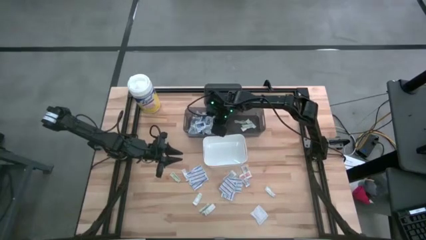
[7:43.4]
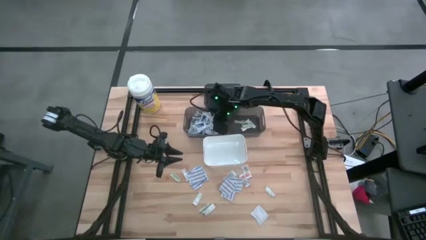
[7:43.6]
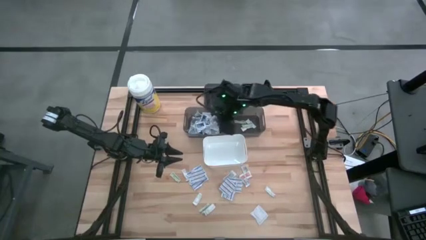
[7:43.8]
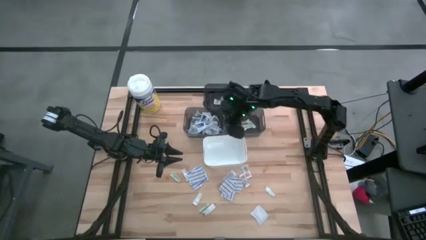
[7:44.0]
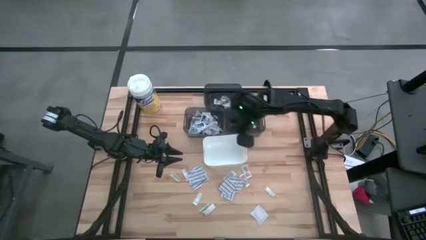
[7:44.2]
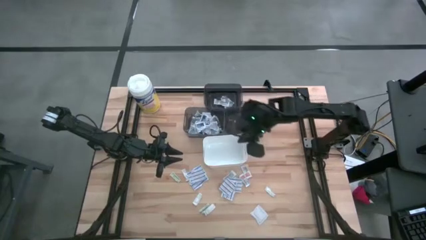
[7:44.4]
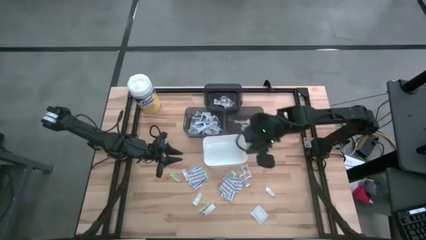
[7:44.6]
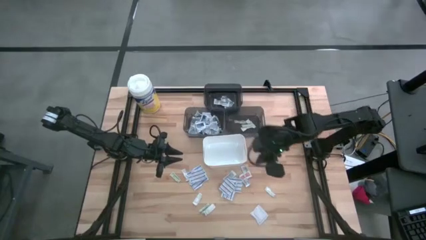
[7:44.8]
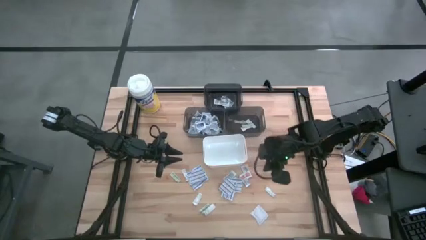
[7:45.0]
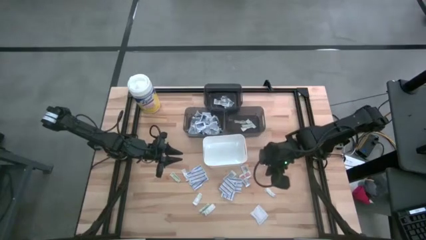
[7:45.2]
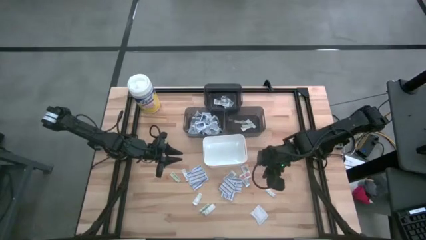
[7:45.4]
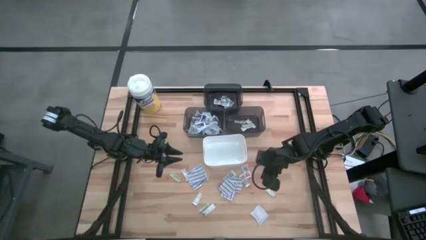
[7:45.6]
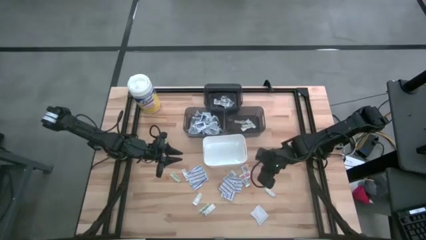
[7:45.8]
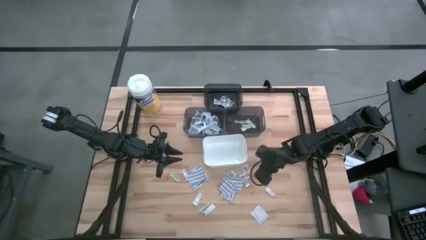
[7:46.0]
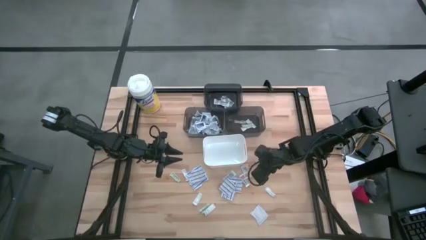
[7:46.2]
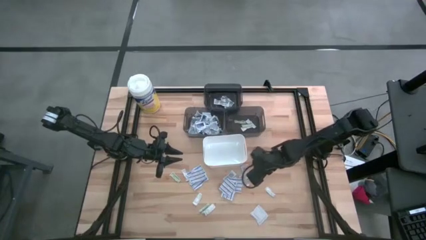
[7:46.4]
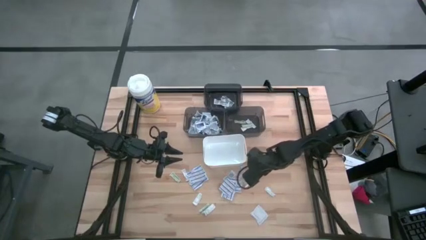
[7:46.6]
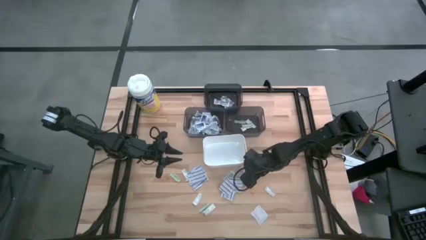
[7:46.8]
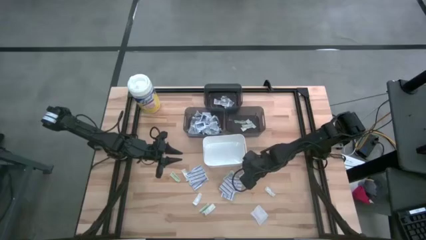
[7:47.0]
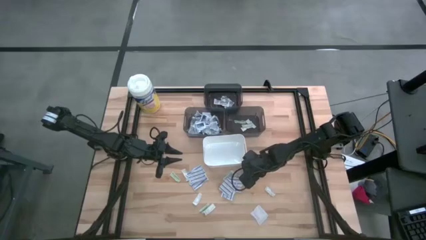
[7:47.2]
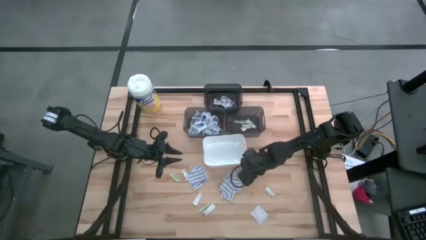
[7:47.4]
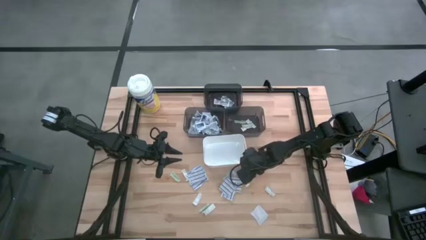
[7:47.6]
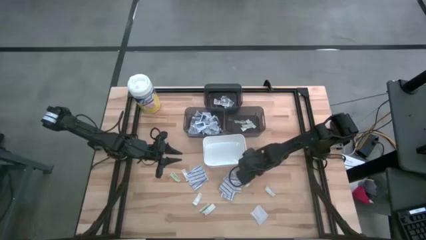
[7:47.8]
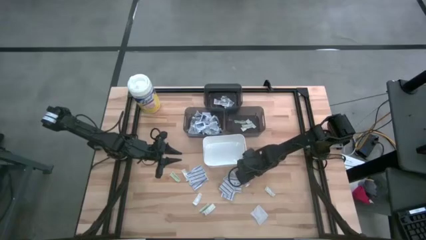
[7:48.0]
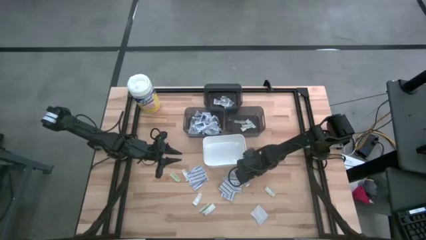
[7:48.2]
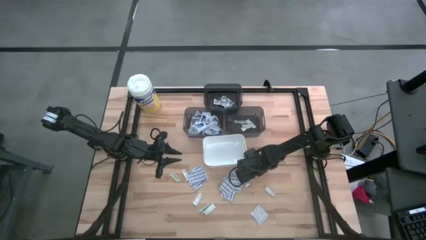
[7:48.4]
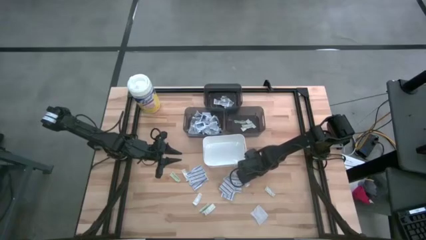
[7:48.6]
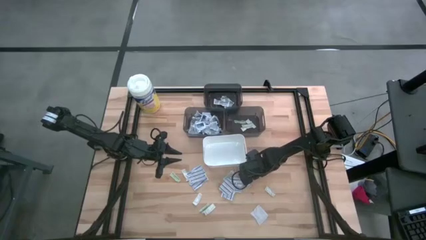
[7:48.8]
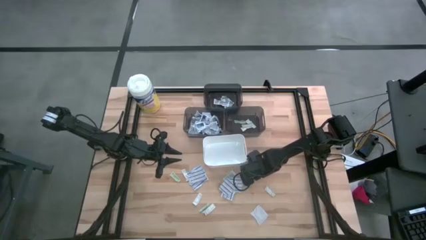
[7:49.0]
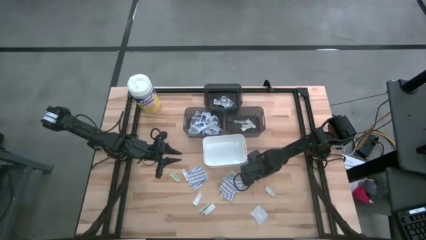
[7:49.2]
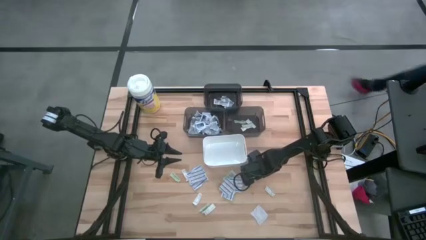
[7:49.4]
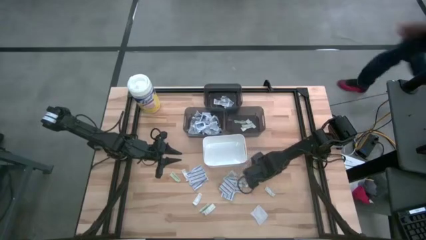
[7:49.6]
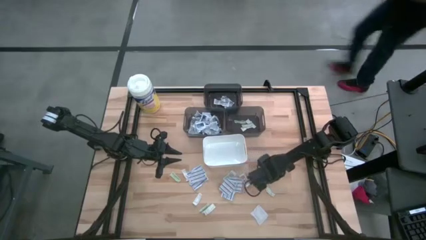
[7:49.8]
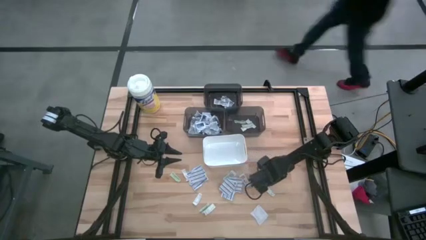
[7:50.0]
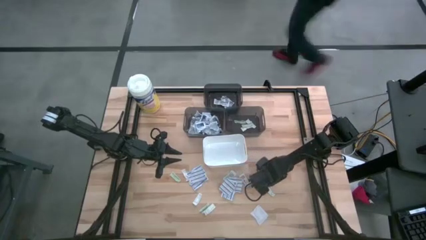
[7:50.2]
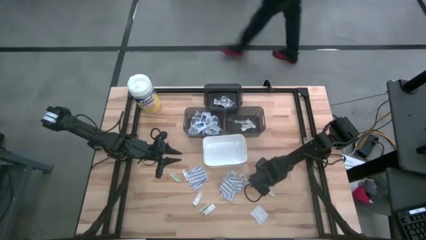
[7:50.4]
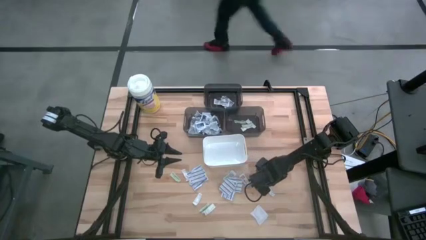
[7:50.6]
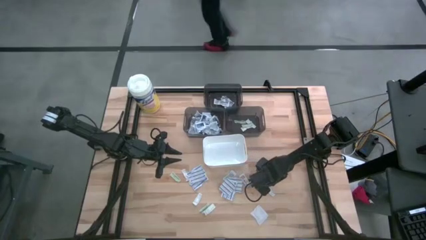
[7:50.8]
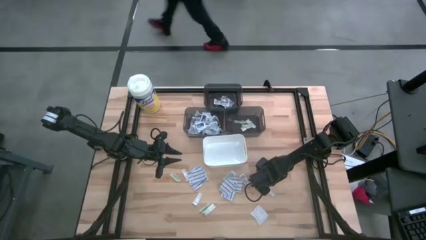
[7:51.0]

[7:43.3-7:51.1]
Task: Pick & Place First Aid Supplies
Put the ointment pack into the top black bin

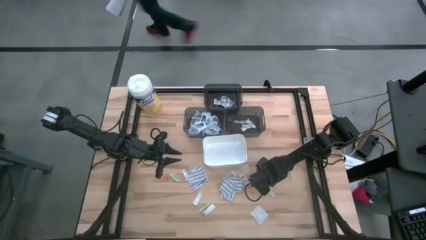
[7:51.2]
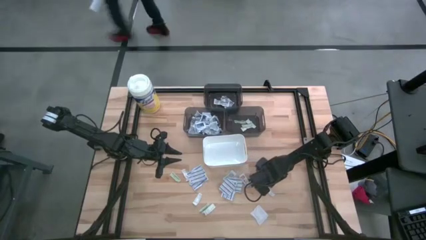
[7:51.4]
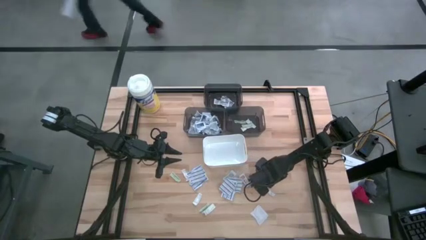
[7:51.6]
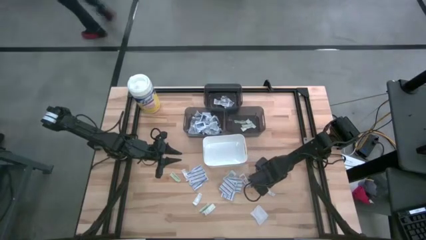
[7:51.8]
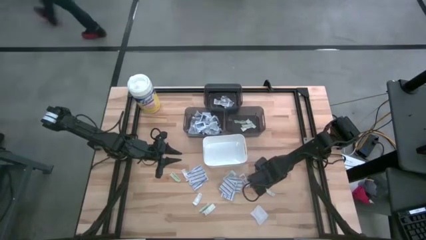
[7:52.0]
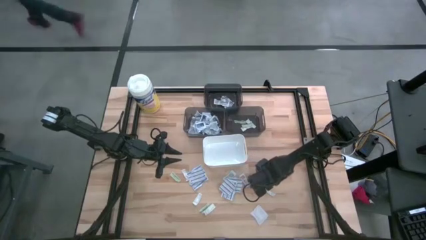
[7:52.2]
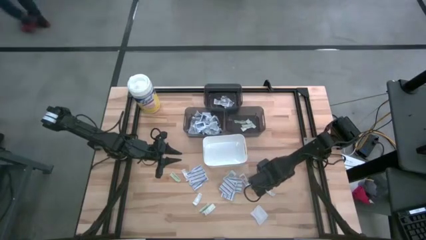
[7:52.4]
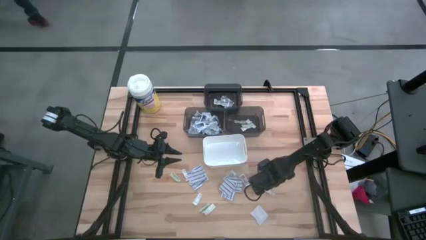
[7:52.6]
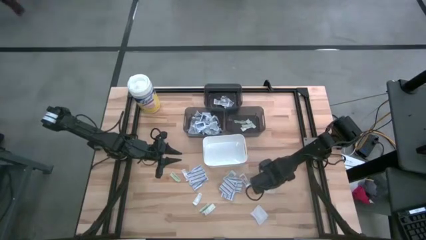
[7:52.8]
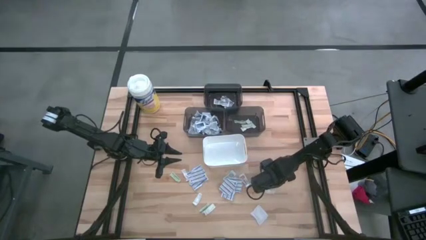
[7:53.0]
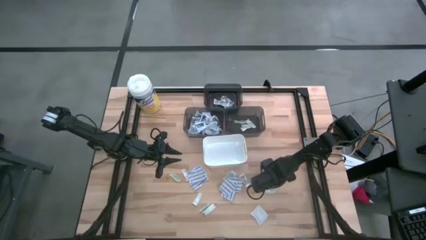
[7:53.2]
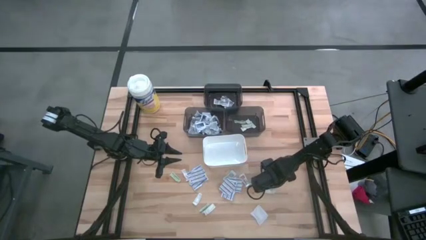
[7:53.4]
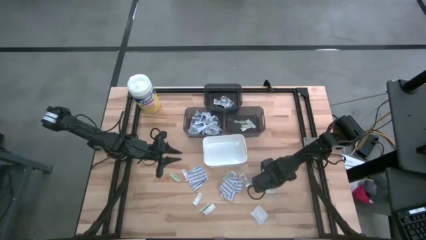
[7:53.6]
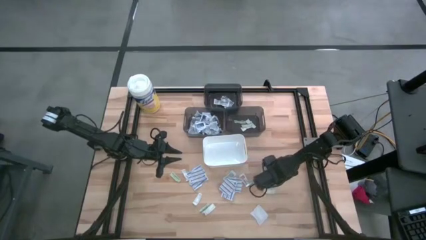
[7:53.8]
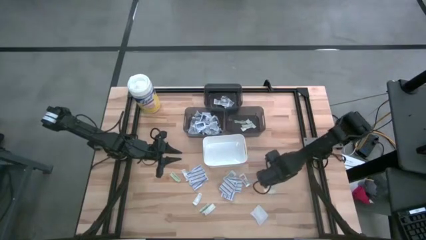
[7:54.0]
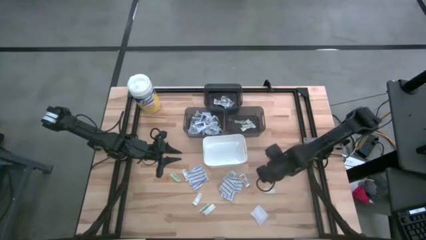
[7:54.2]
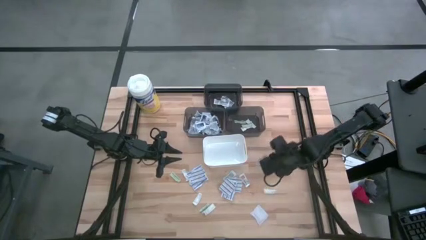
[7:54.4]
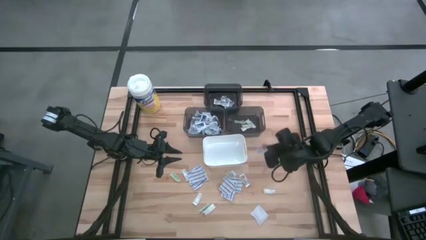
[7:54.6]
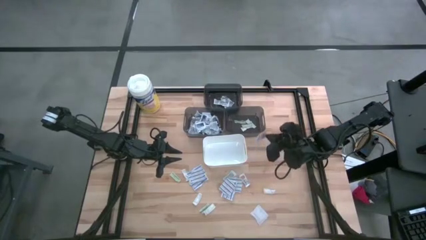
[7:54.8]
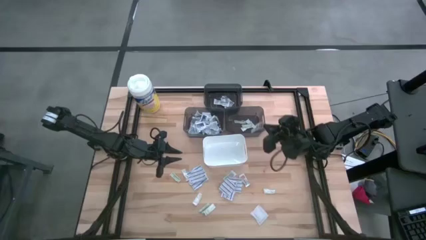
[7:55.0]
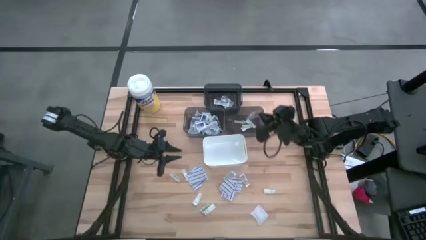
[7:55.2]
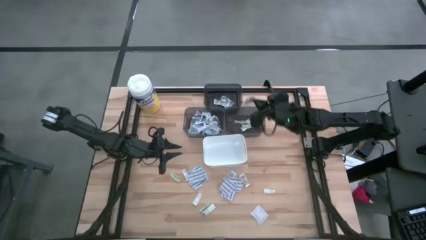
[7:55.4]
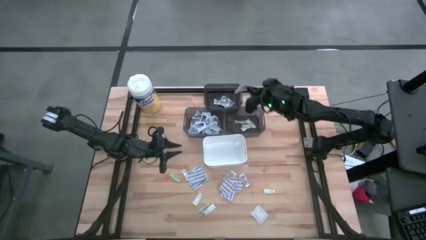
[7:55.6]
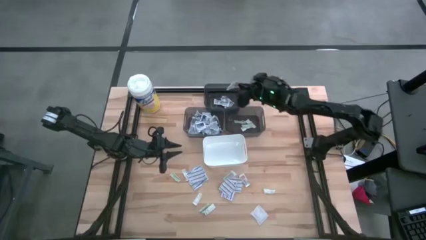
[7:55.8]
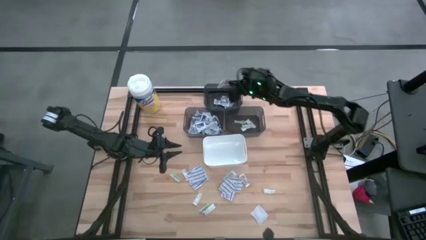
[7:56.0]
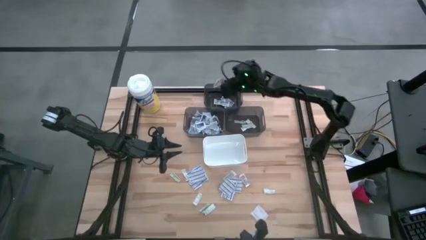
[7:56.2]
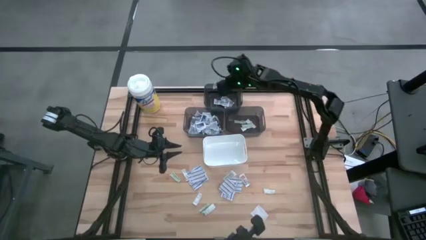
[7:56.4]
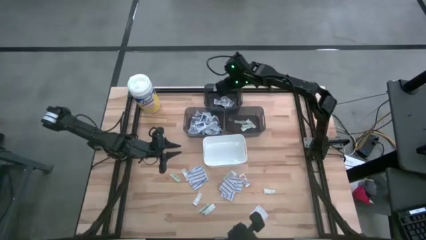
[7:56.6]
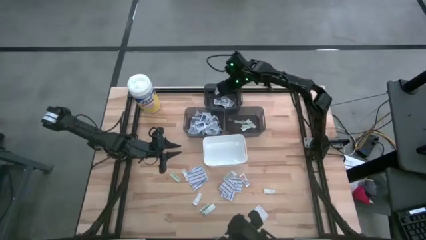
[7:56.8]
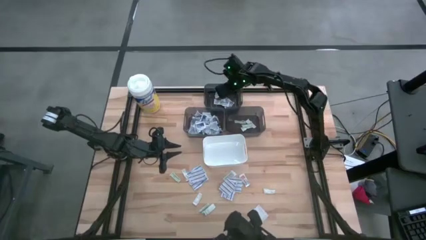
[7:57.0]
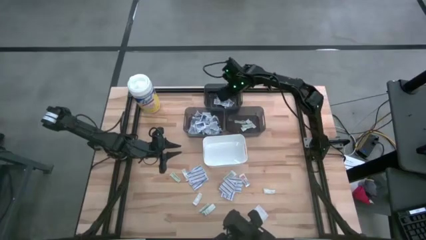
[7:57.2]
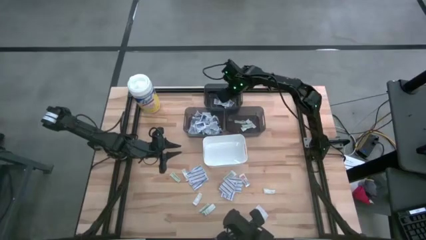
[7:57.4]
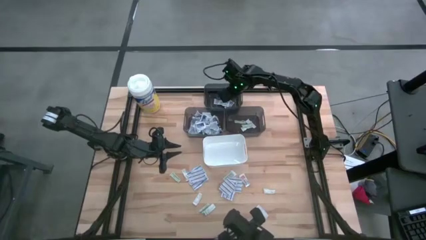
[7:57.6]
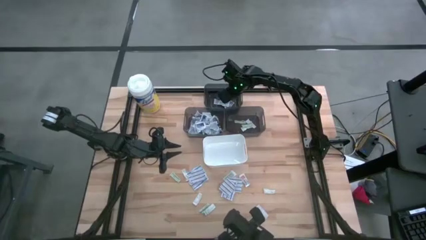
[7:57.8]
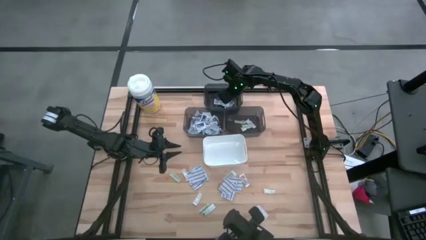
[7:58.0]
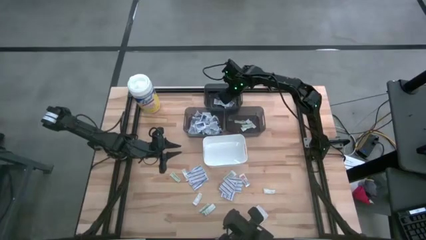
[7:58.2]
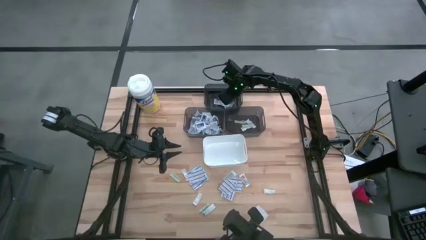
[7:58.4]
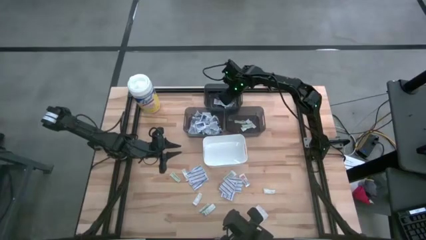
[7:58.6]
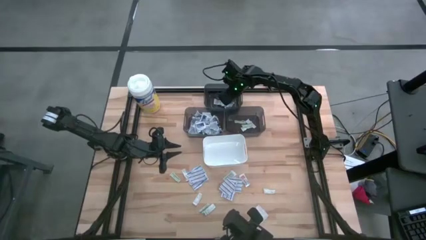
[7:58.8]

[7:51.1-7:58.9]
Put the ointment pack into the top black bin
